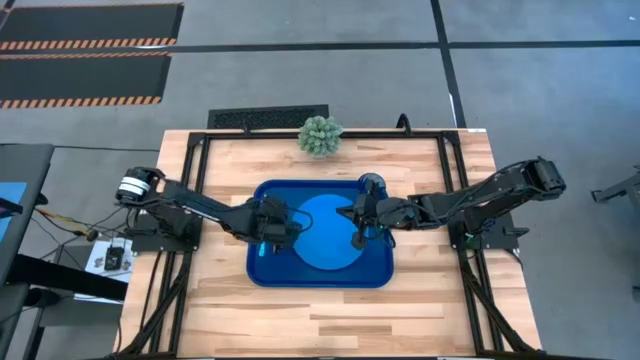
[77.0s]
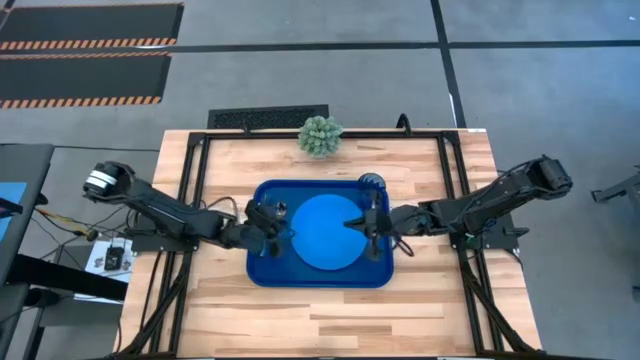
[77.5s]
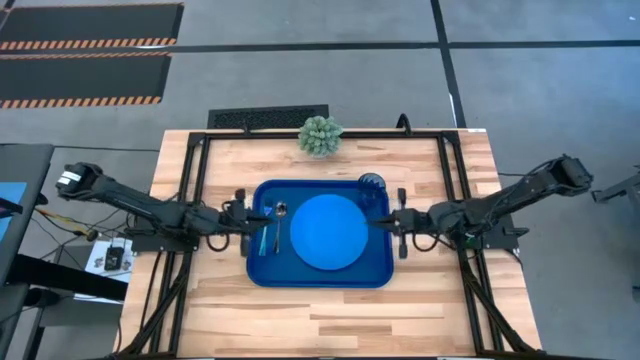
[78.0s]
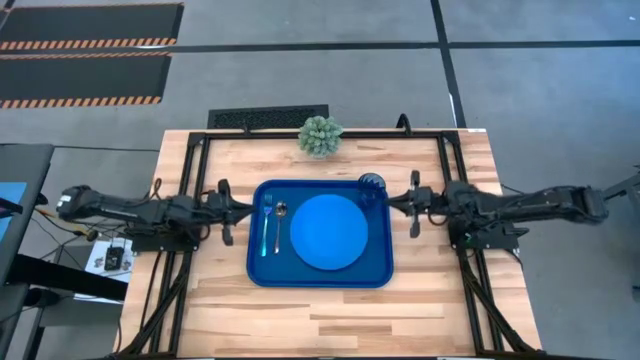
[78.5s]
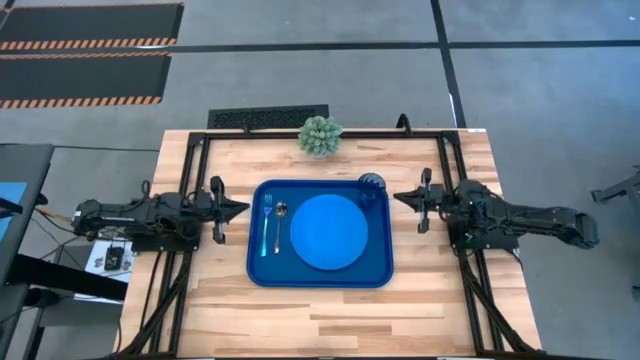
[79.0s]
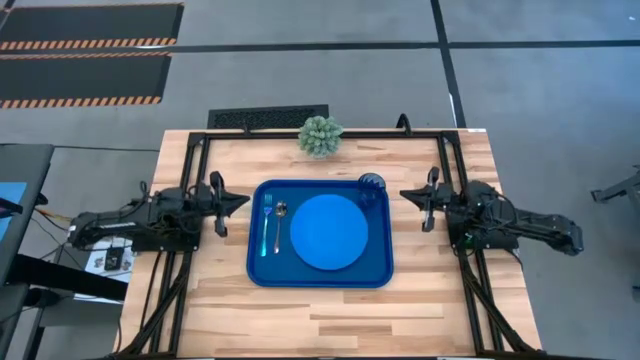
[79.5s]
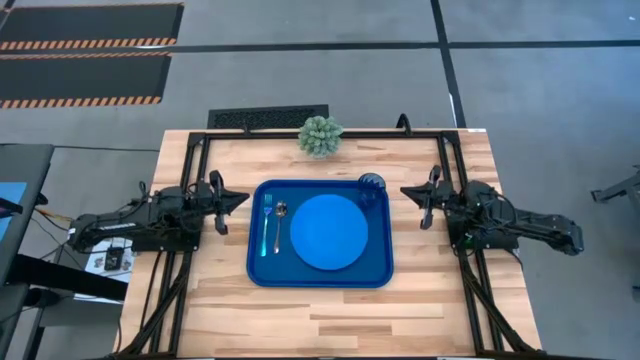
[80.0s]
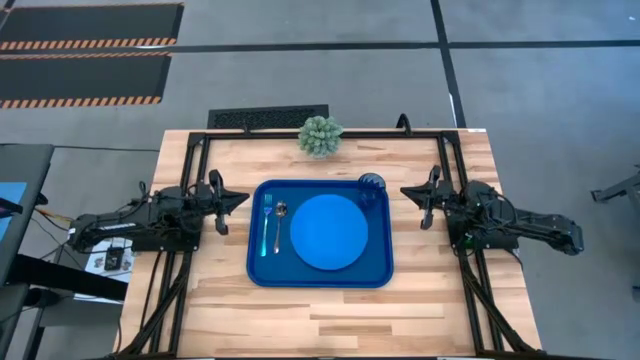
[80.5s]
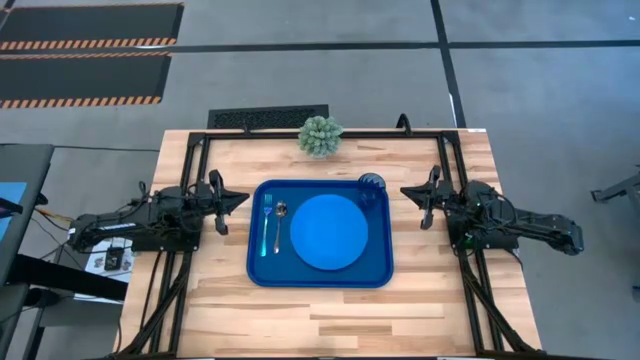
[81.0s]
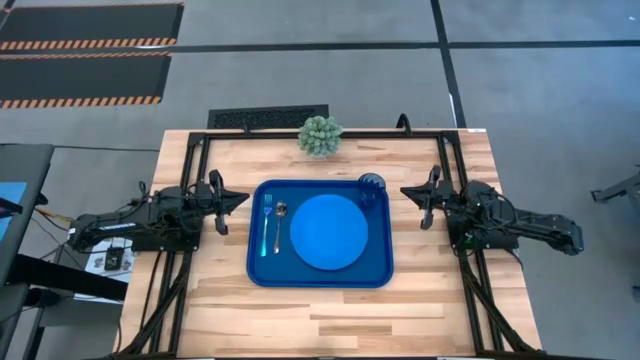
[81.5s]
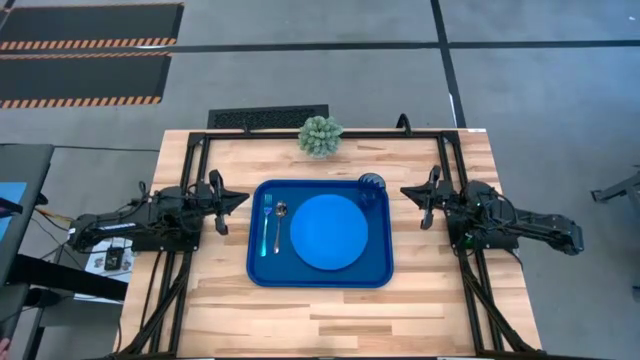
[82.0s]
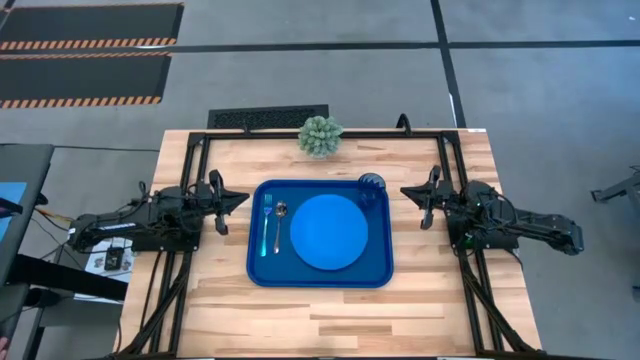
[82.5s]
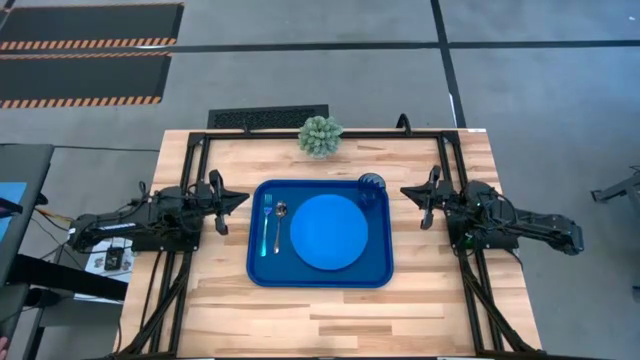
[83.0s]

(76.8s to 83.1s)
Task: Pick and place plate/cup/fork/spoon on tray
Return to Home Position

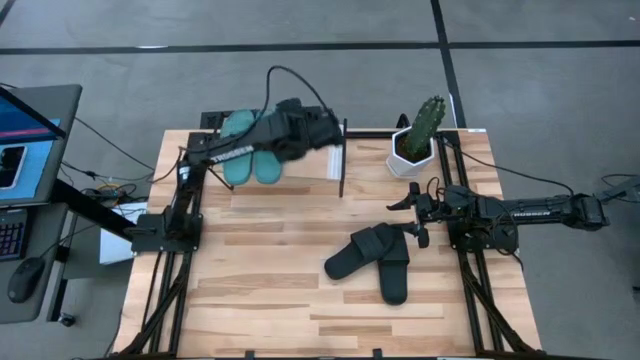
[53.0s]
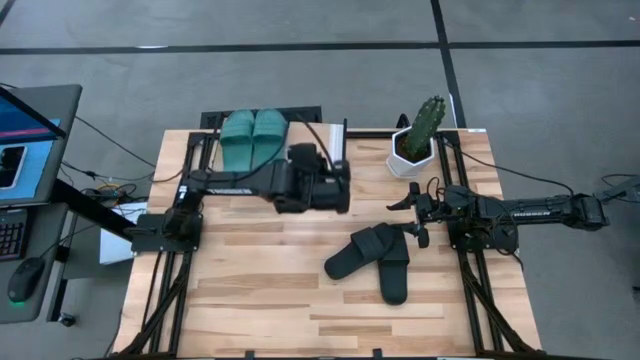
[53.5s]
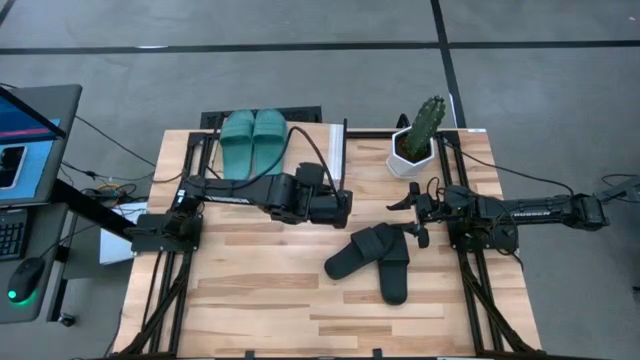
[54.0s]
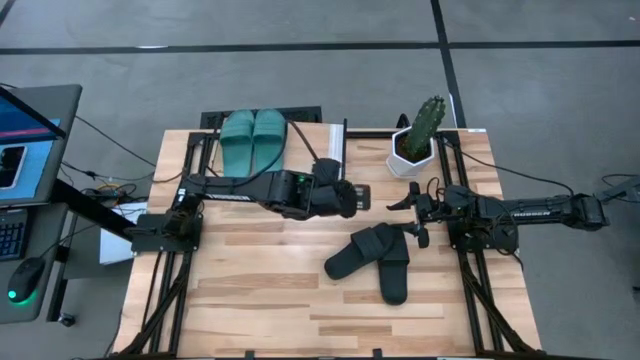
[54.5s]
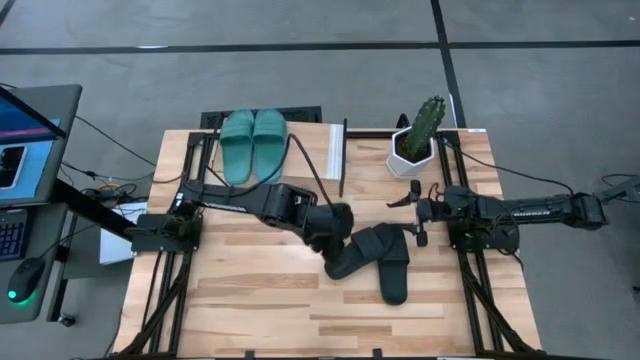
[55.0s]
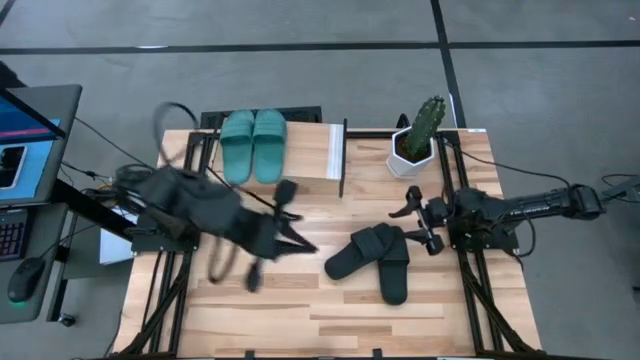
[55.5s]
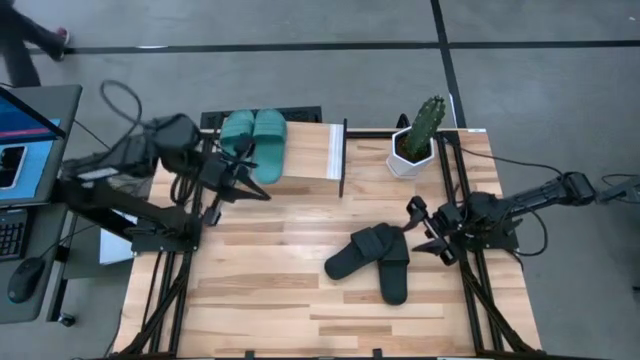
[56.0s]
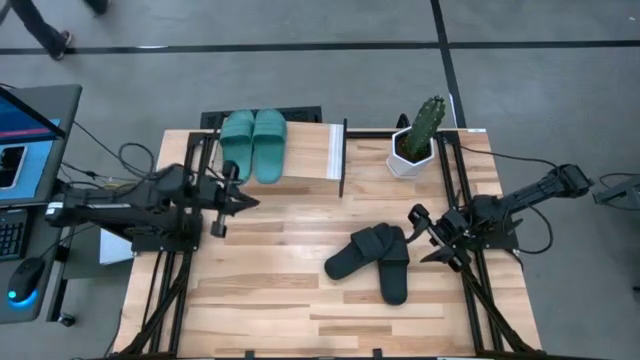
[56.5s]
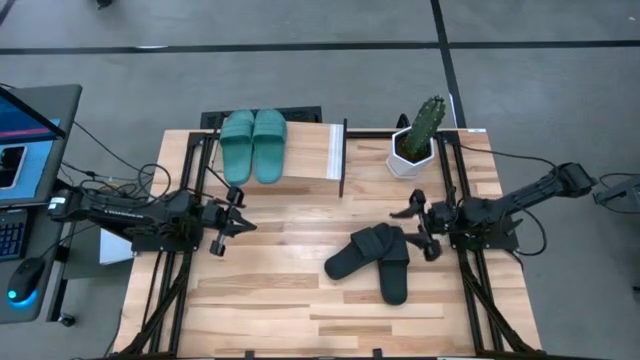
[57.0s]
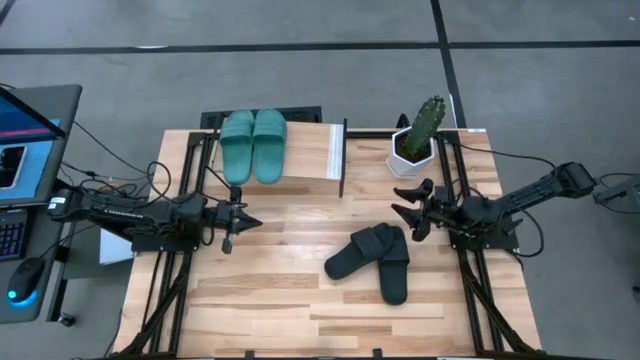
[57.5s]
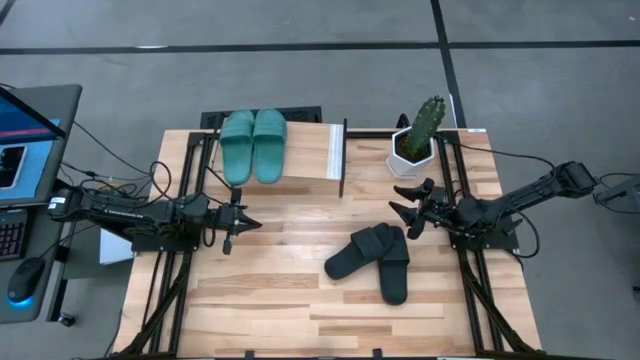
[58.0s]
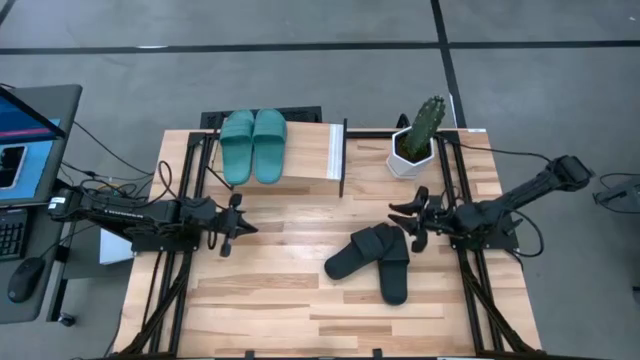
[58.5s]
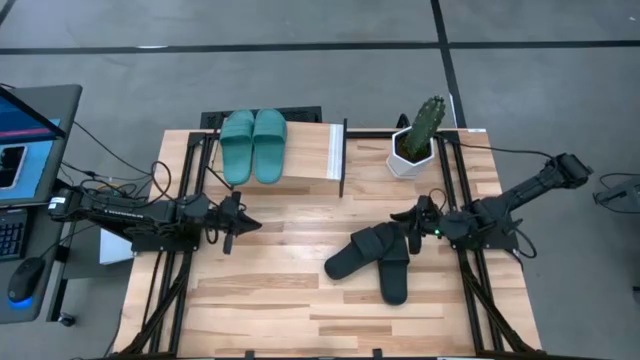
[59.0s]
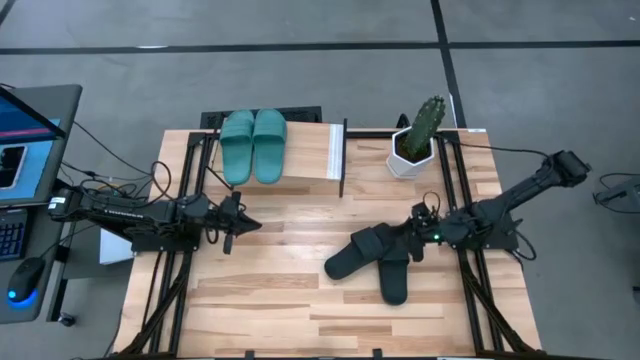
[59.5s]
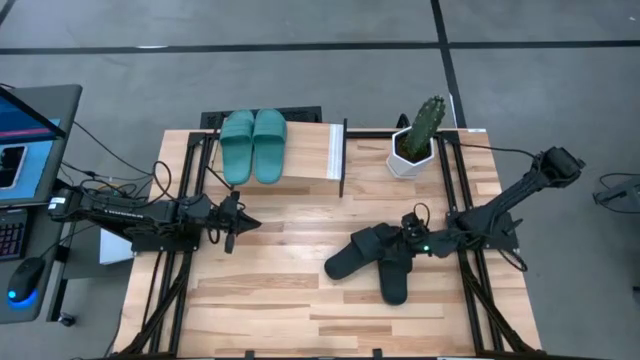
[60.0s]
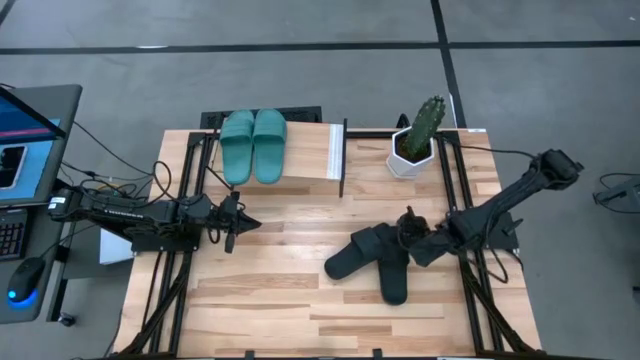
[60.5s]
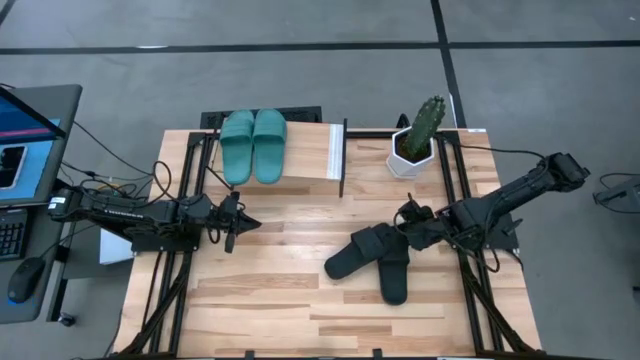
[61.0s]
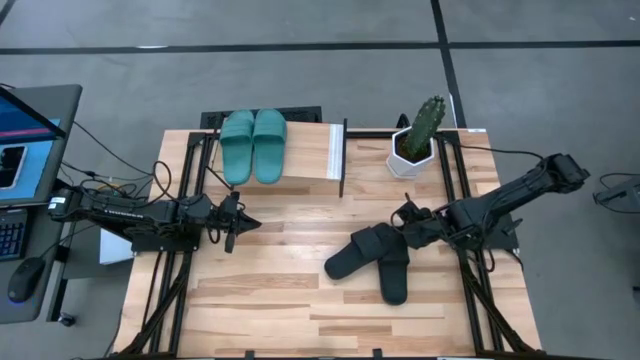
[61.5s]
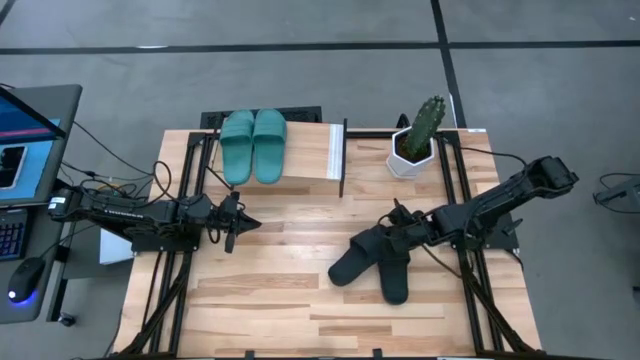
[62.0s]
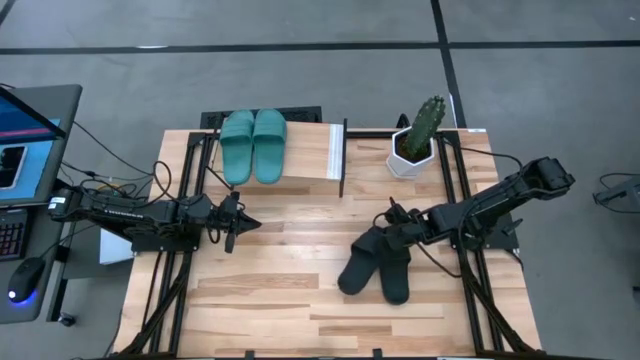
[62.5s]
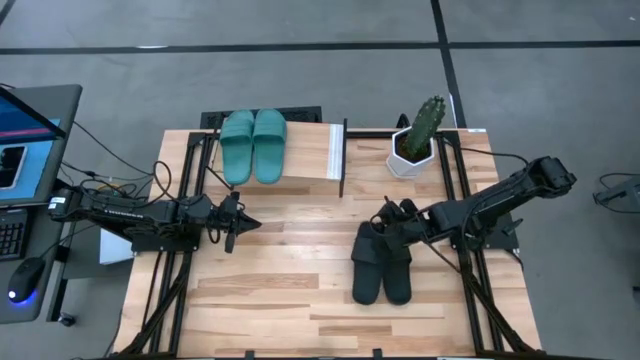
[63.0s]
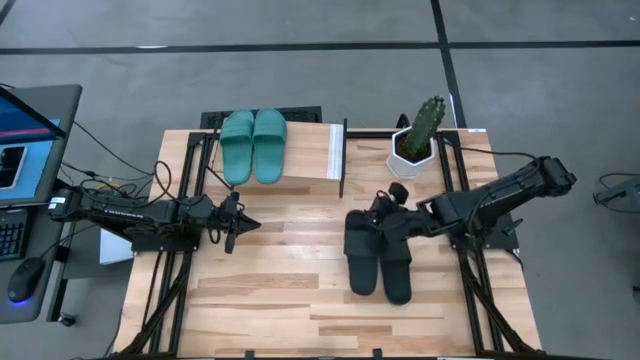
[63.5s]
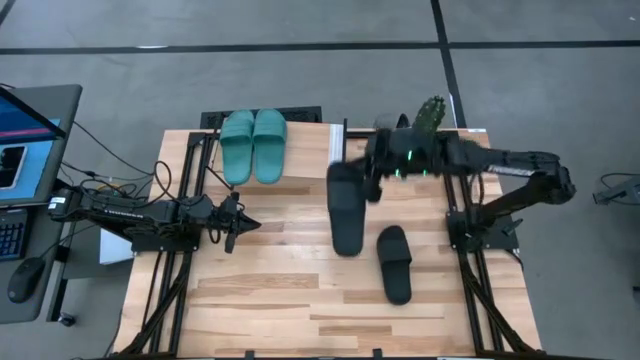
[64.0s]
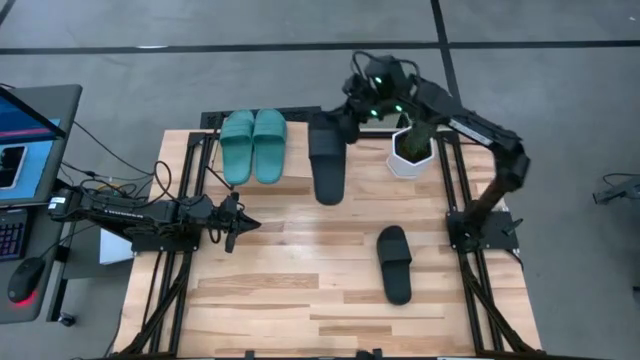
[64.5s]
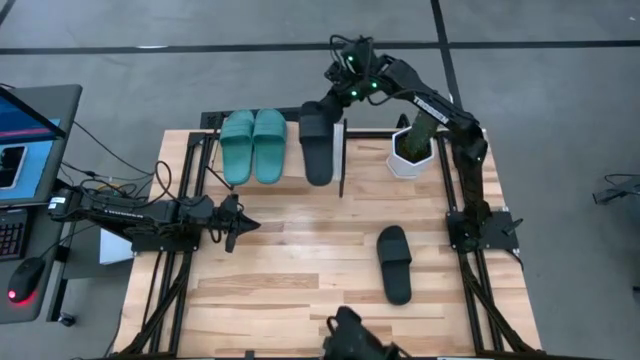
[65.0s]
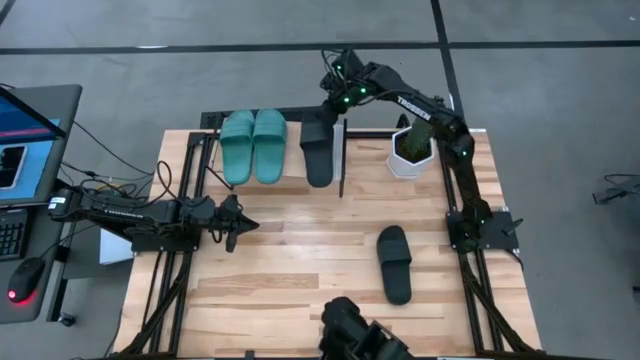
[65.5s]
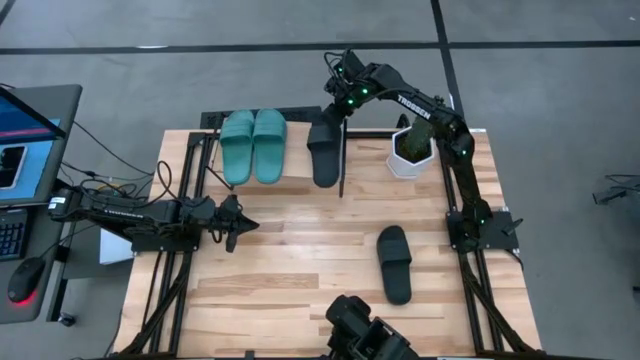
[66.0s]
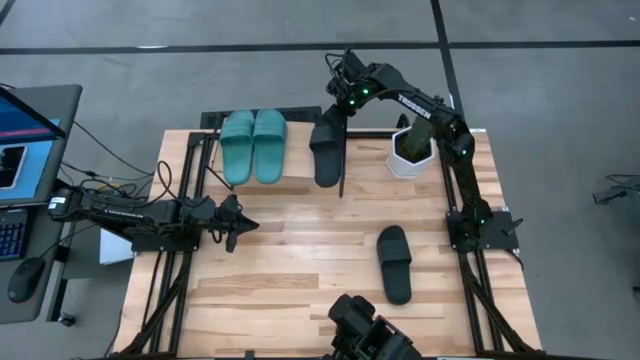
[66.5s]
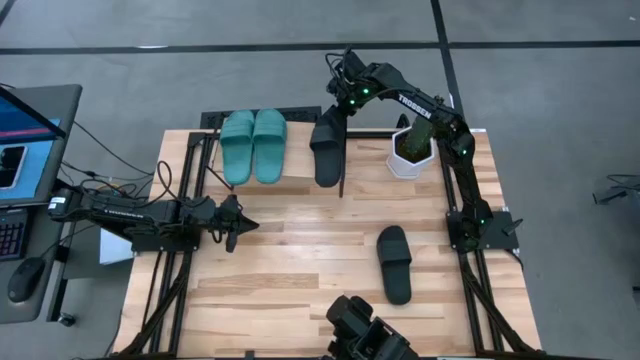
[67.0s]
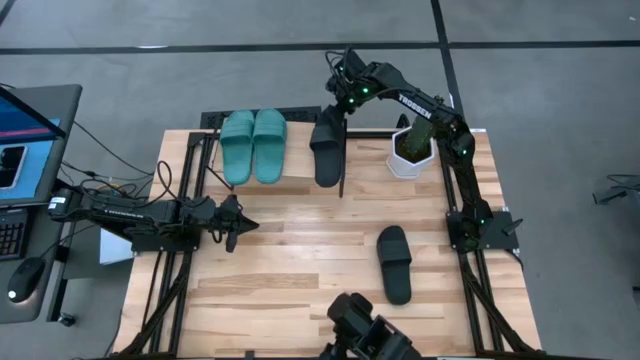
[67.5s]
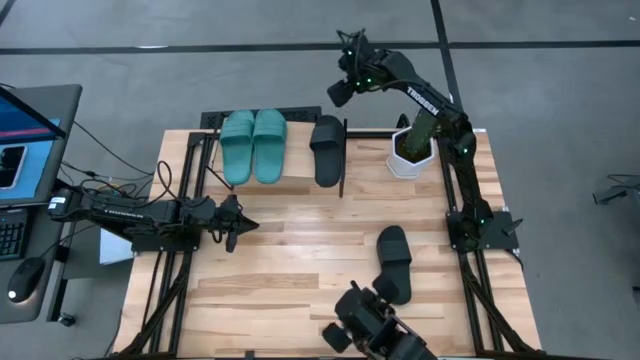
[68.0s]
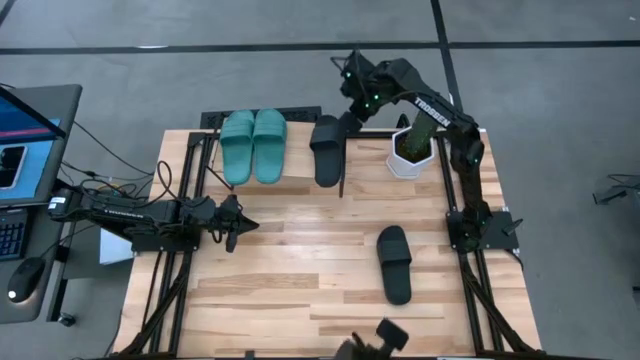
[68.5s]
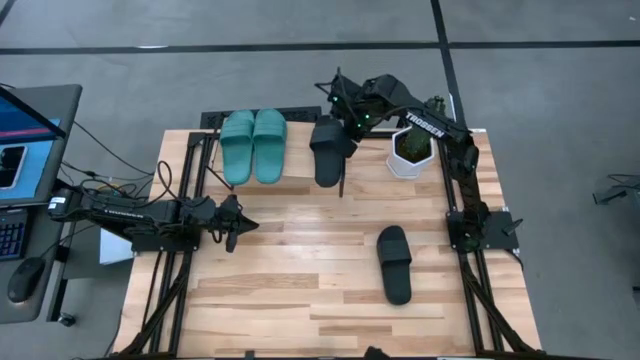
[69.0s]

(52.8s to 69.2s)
Task: Pick and place slides into the shelf
Put the left black slide on the shelf
